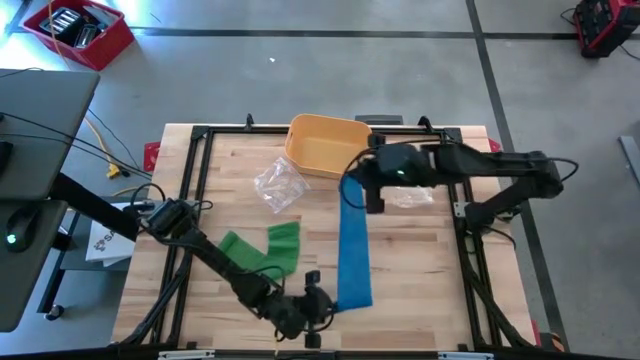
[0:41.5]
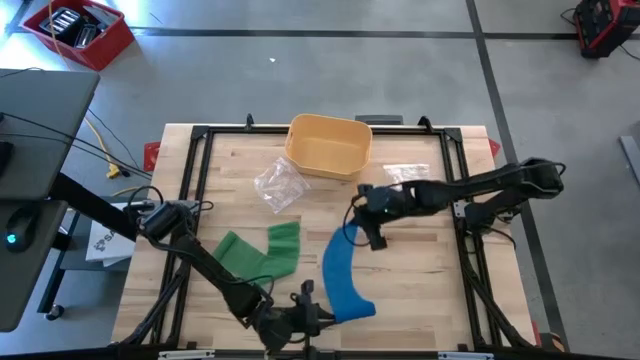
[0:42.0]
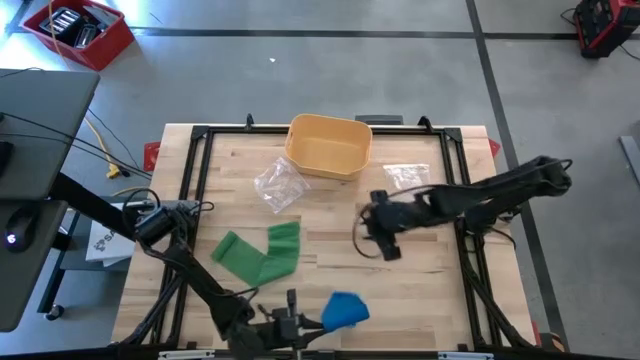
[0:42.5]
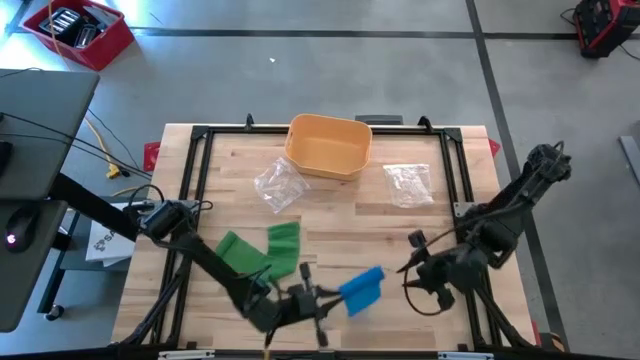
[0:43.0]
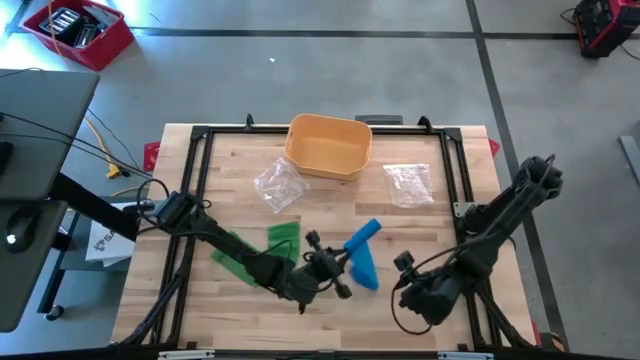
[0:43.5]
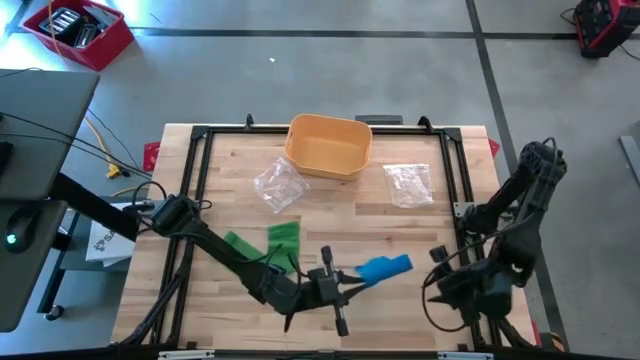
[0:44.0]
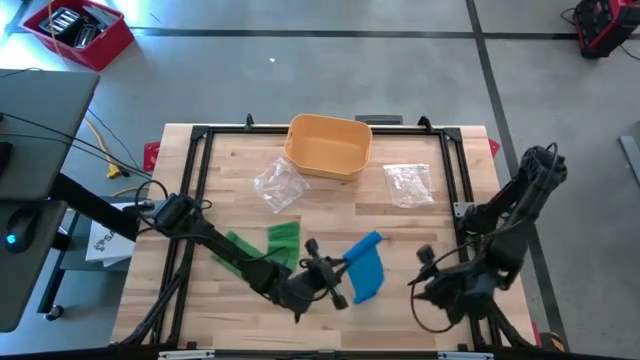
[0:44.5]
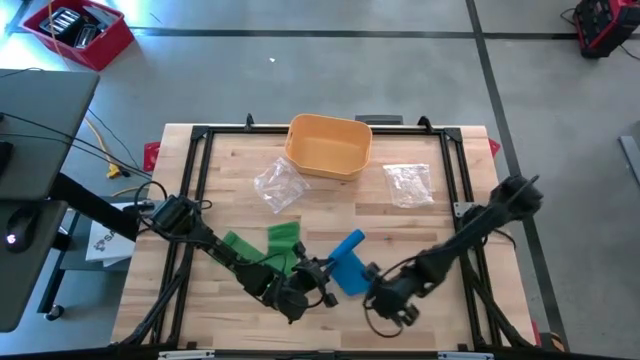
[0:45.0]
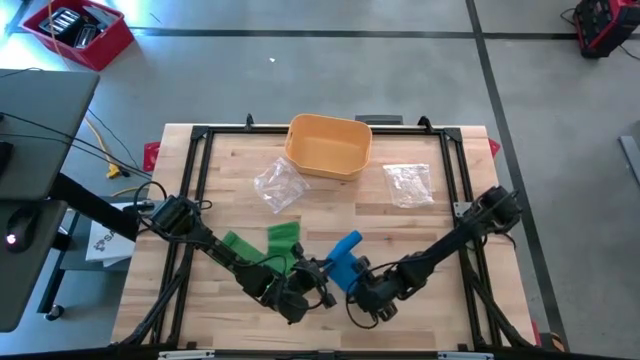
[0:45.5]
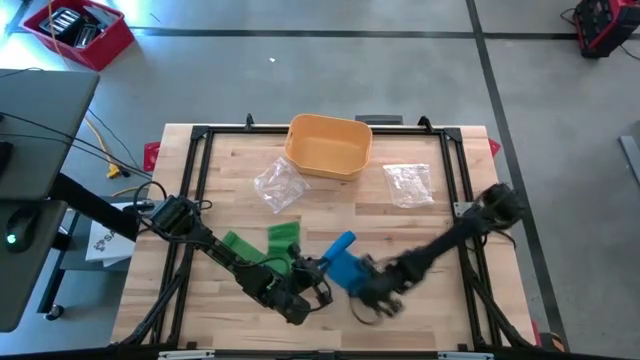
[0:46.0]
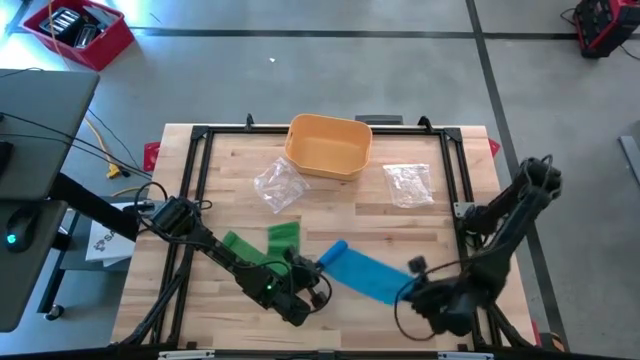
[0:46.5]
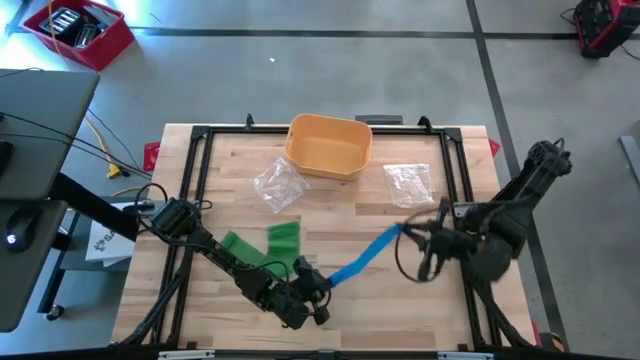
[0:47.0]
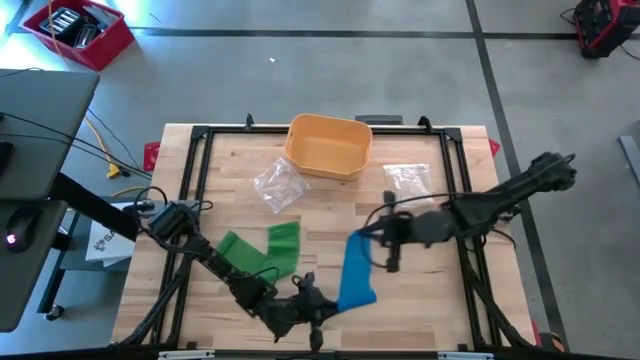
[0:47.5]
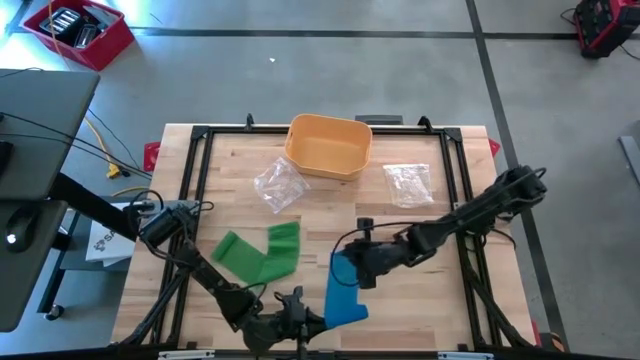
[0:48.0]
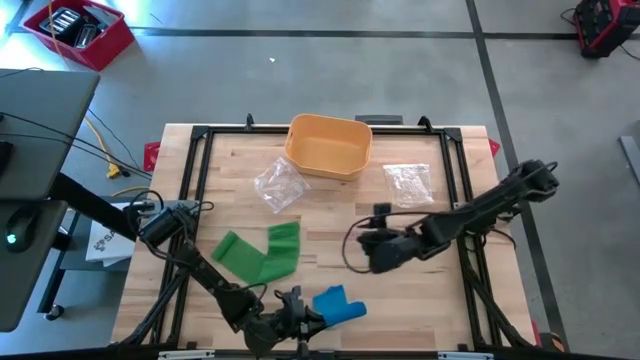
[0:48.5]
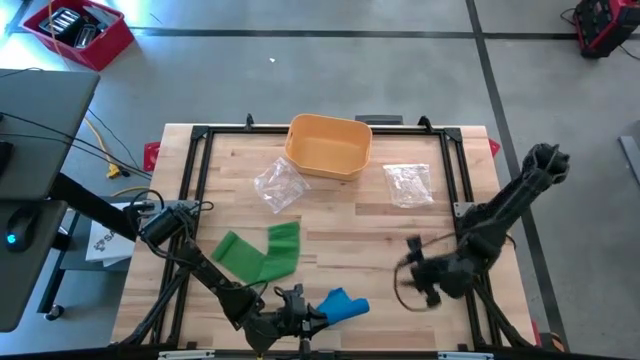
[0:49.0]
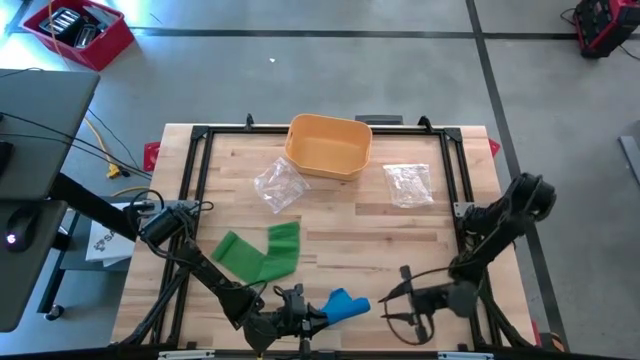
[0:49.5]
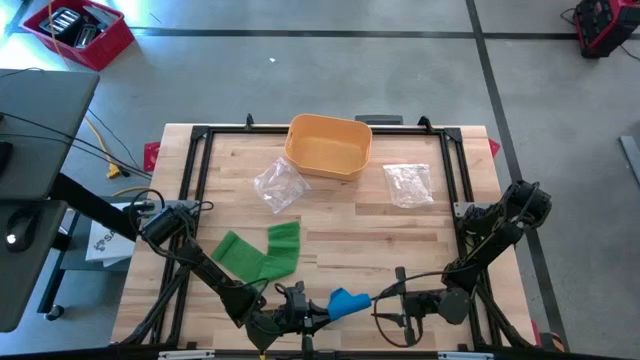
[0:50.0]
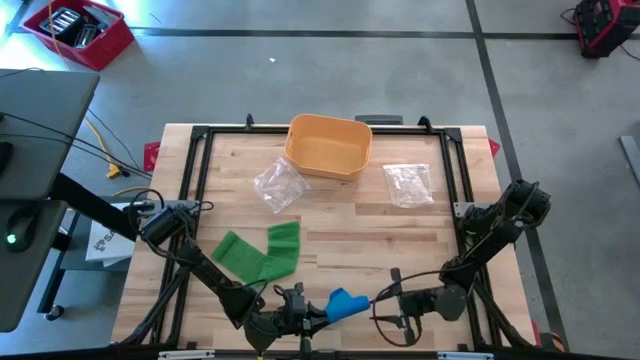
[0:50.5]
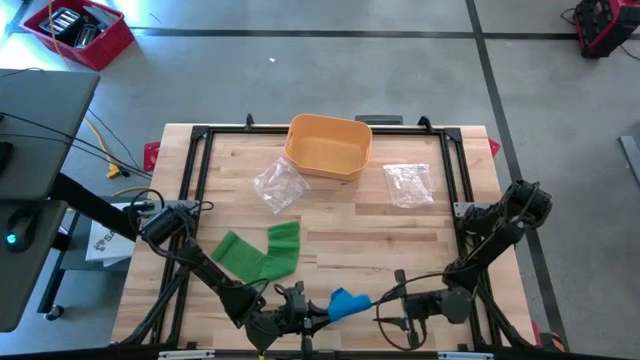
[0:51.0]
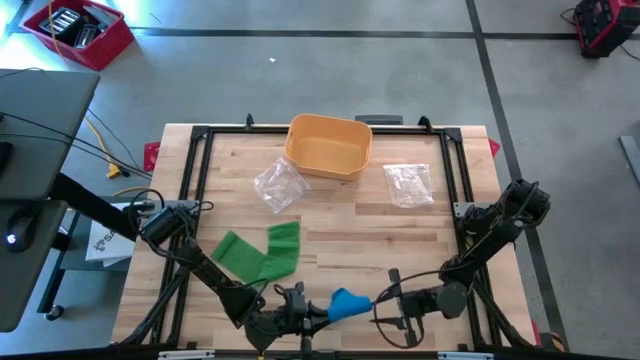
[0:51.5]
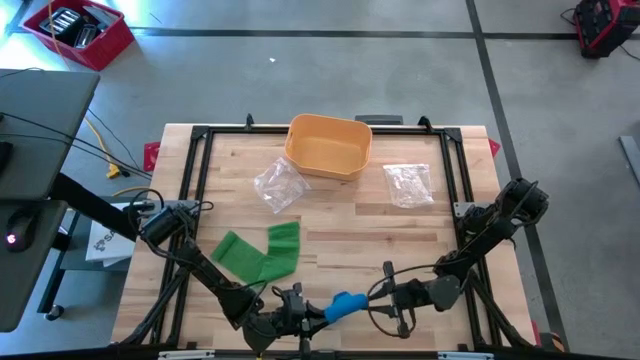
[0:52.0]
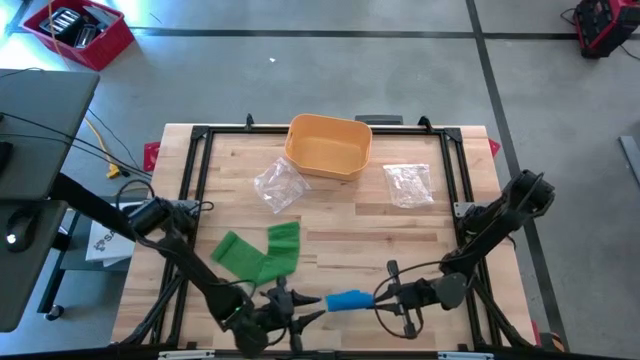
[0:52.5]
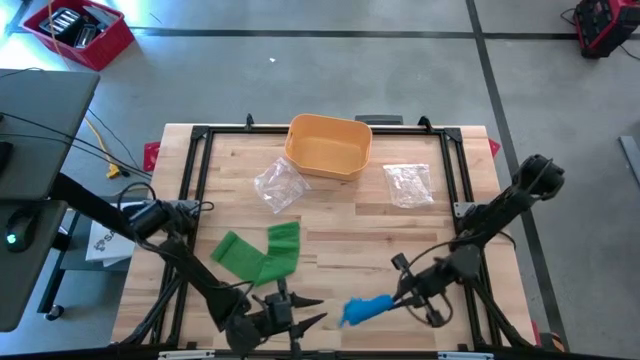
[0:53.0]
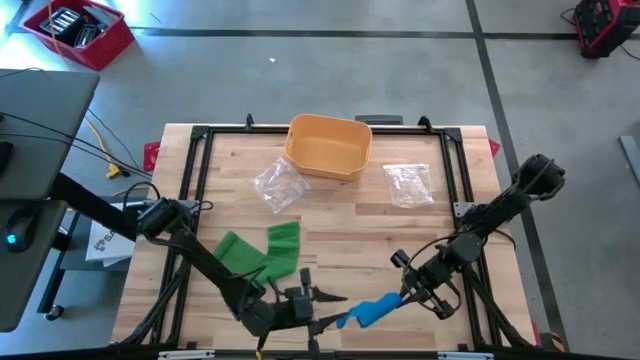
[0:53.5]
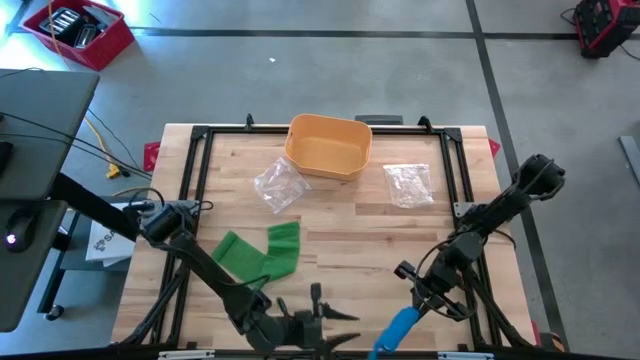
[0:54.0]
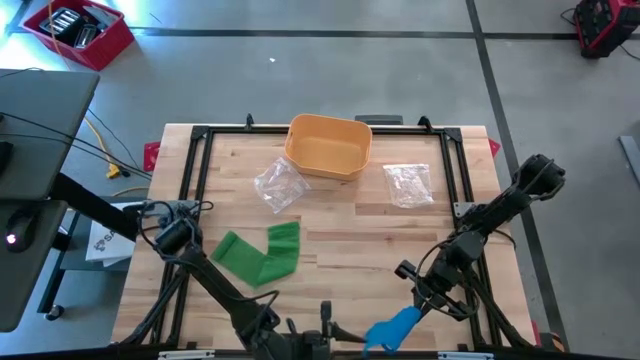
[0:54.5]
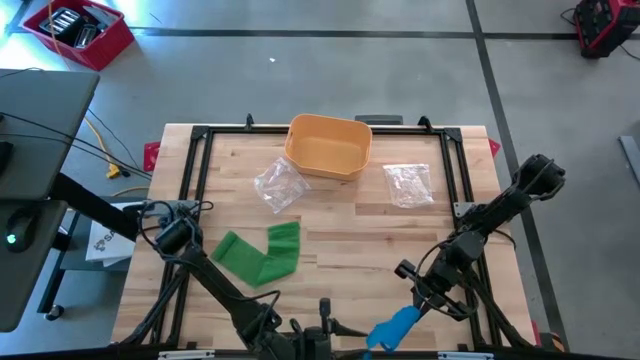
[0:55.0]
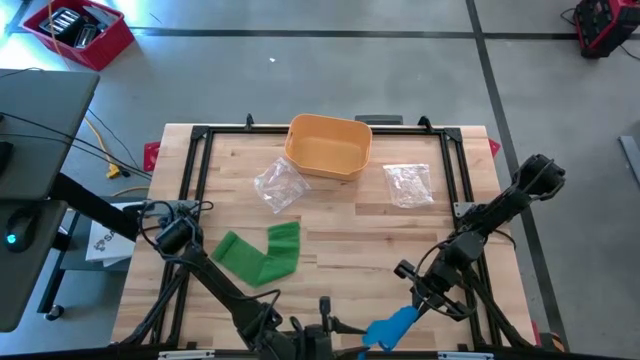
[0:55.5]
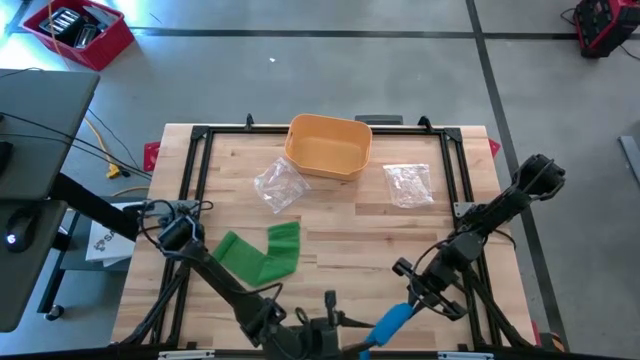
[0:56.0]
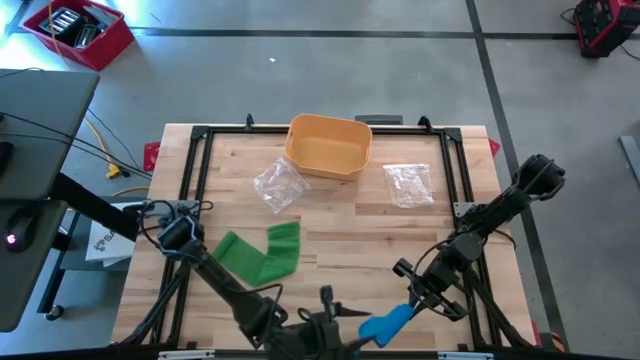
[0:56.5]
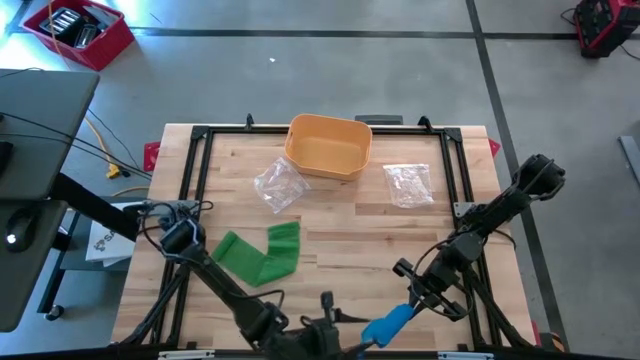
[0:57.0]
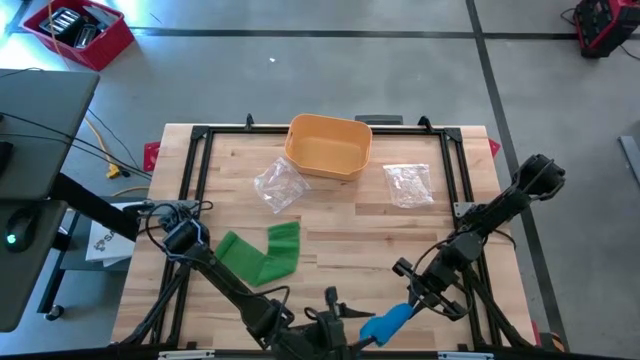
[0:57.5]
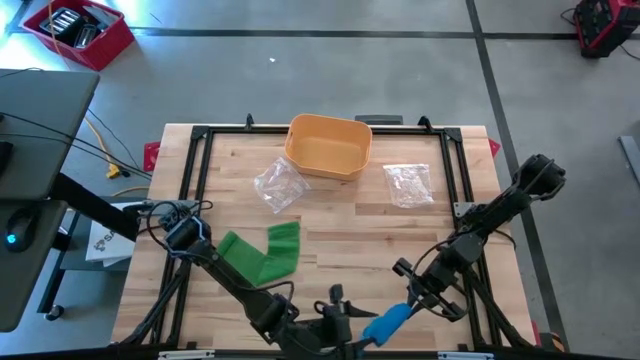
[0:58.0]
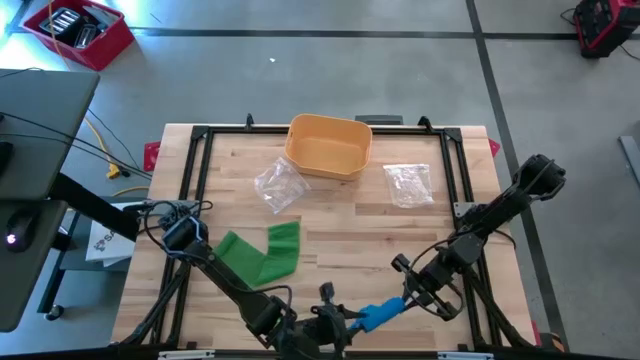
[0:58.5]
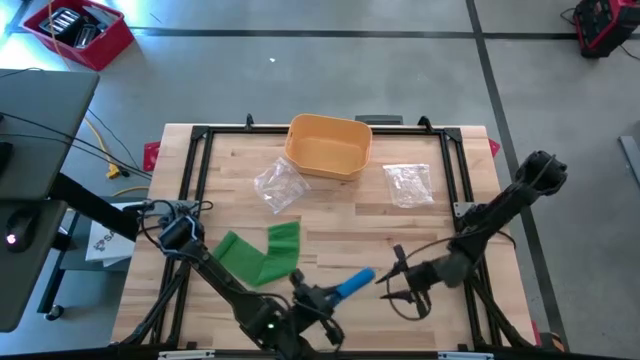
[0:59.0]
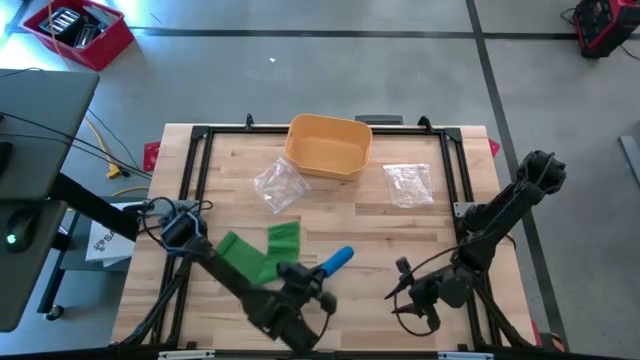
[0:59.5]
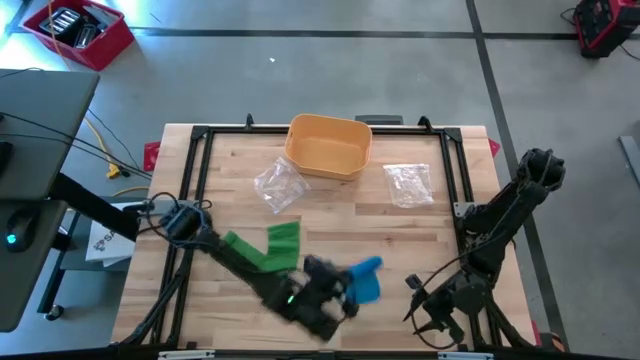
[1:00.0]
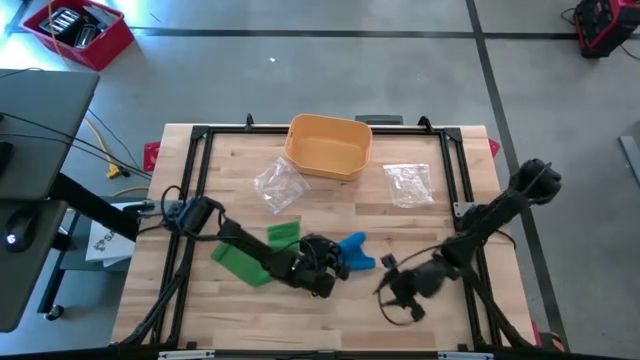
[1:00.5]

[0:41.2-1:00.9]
Task: Roll bandage
Roll the blue bandage

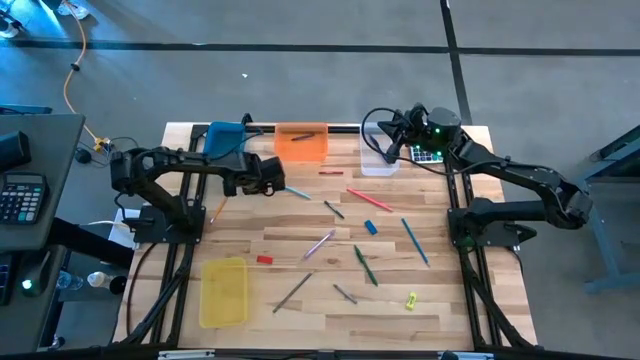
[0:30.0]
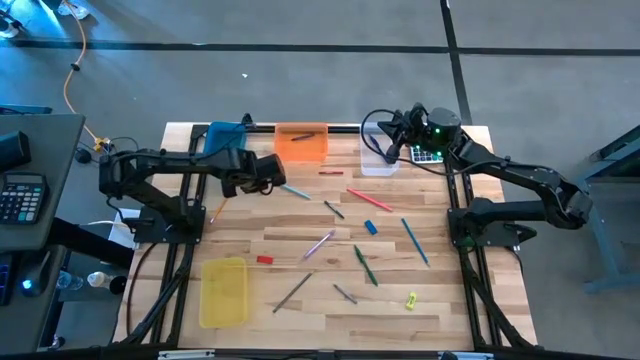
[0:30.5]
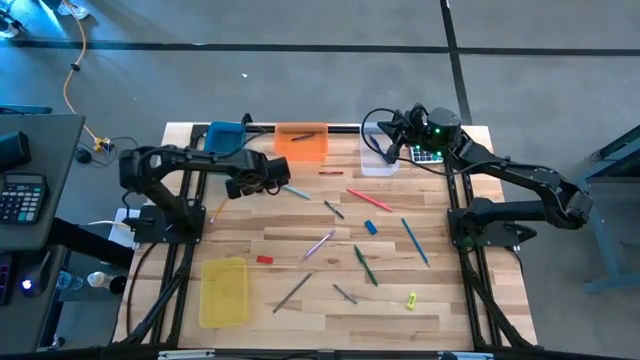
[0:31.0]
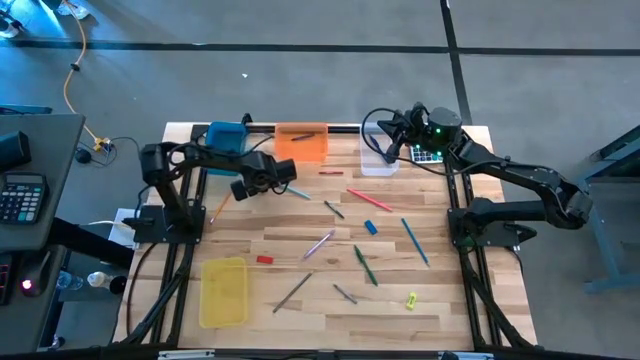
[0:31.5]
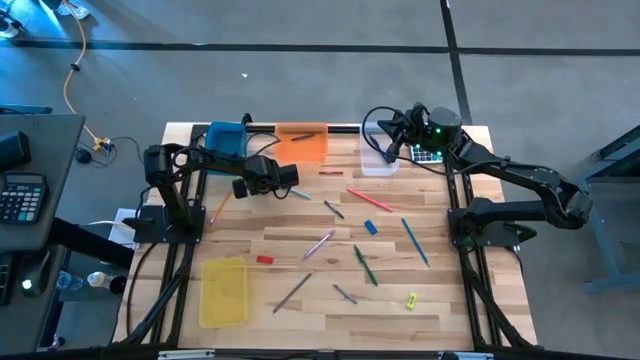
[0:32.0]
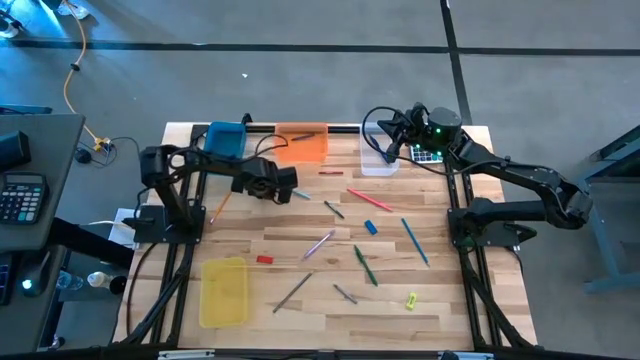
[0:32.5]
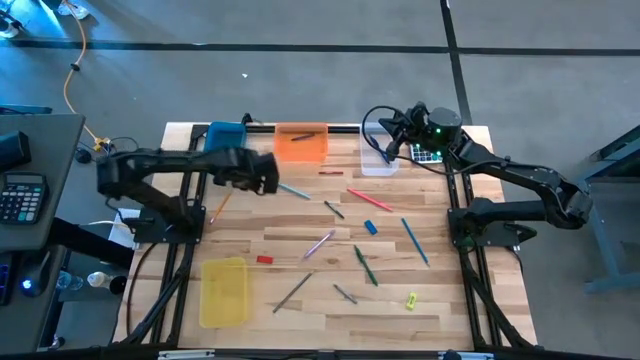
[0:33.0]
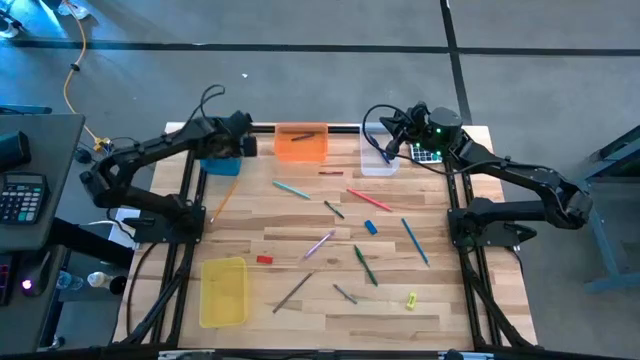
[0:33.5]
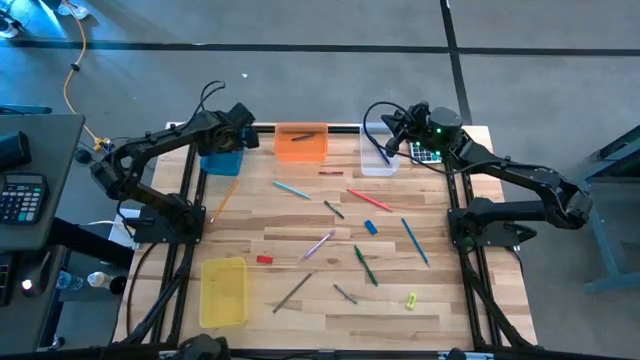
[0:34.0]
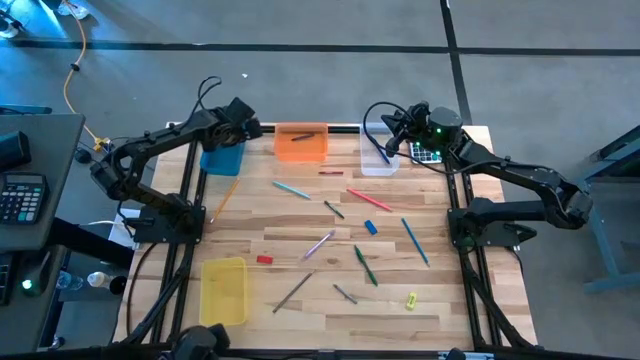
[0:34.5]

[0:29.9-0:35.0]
Task: Sort crayons/erasers/pens/pencils in bins
Put the pink eraser into the blue bin
